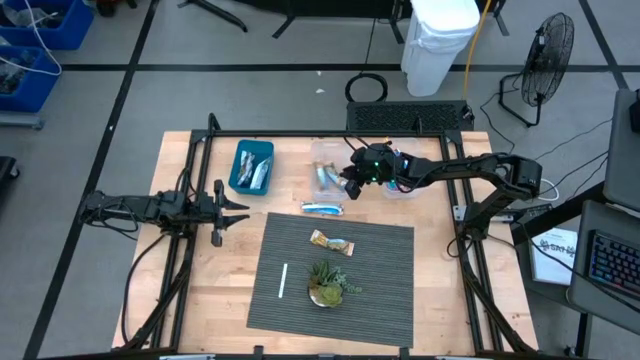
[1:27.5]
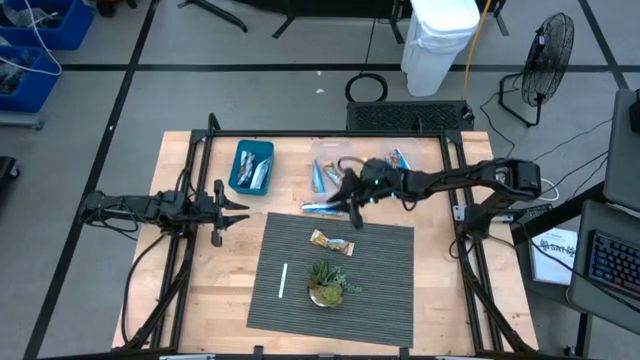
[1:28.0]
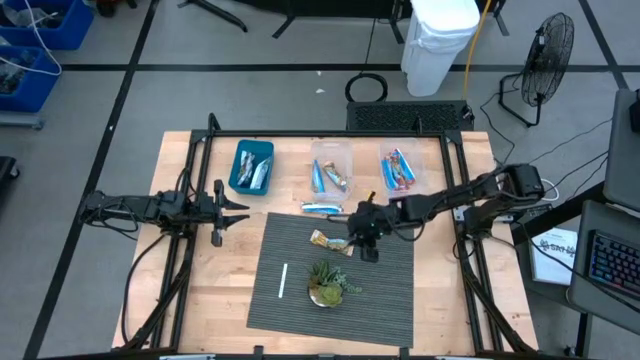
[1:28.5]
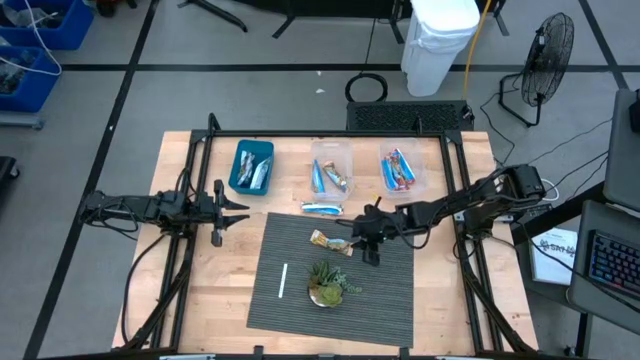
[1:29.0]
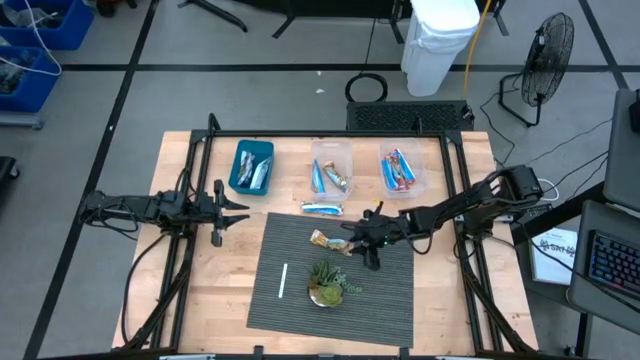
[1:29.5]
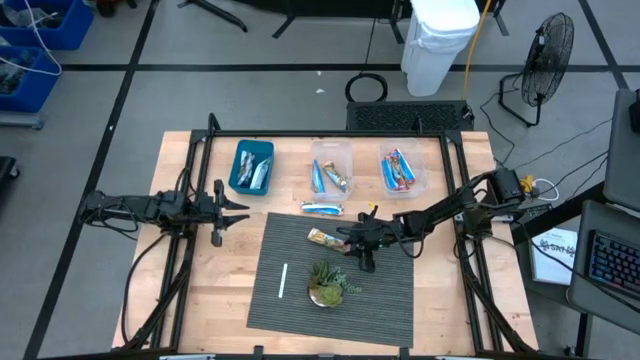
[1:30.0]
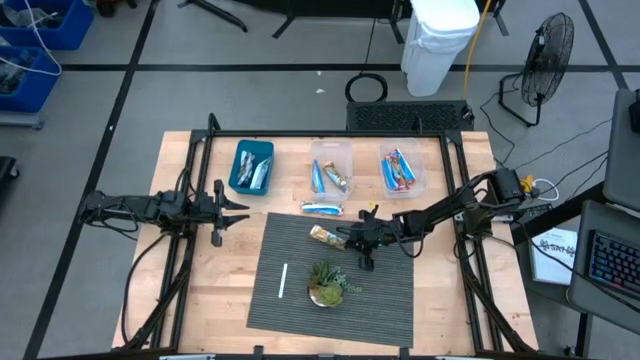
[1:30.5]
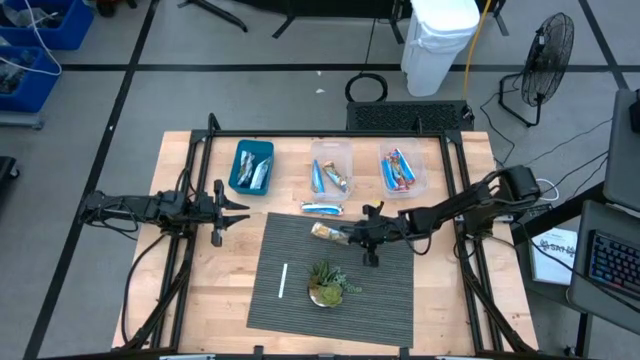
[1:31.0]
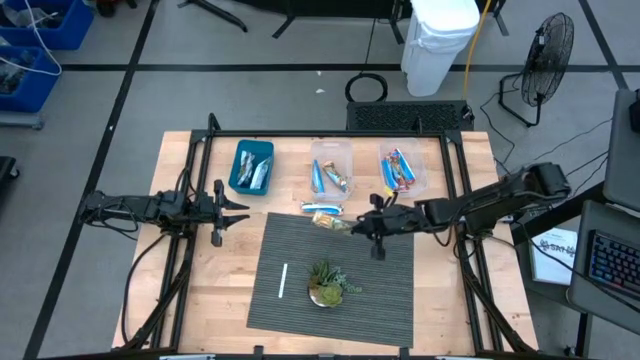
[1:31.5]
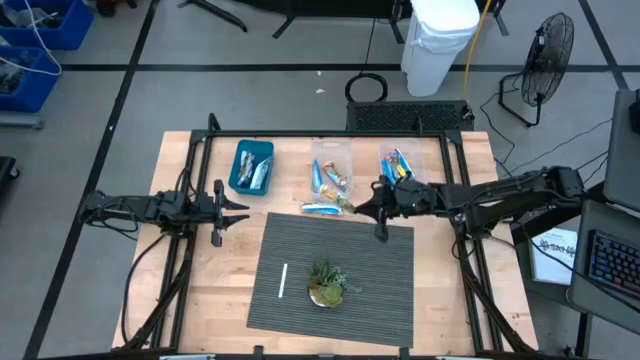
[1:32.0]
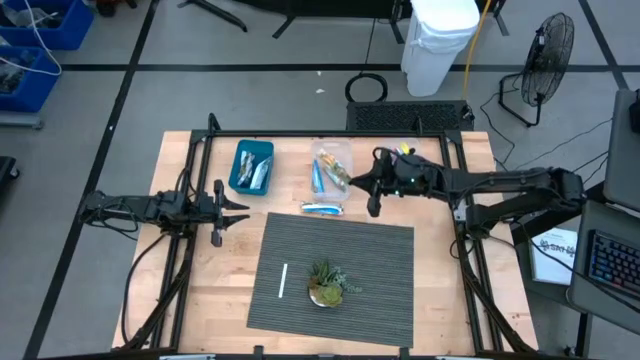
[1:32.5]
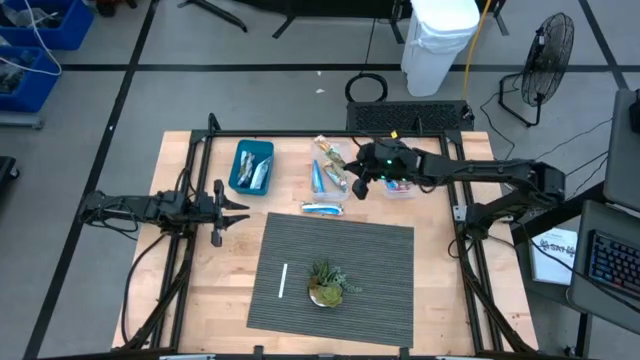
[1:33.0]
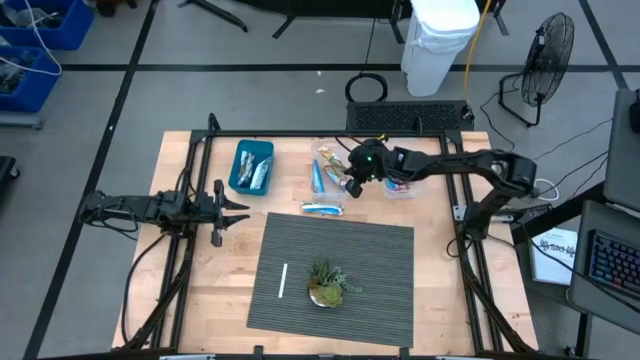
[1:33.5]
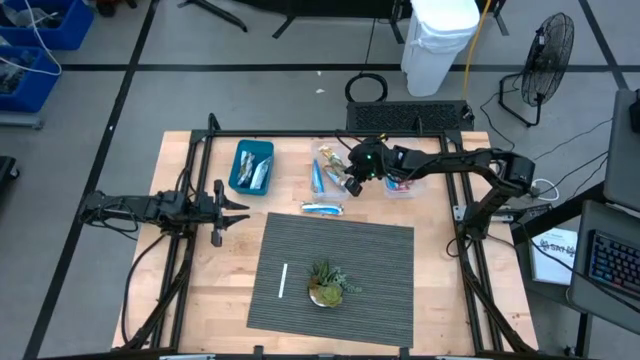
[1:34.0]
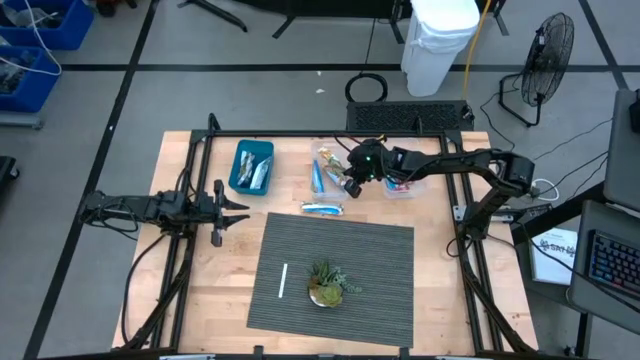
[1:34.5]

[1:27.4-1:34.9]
Task: Pick and place Granola Bars by type
Put the yellow granola bar into the left transparent bin

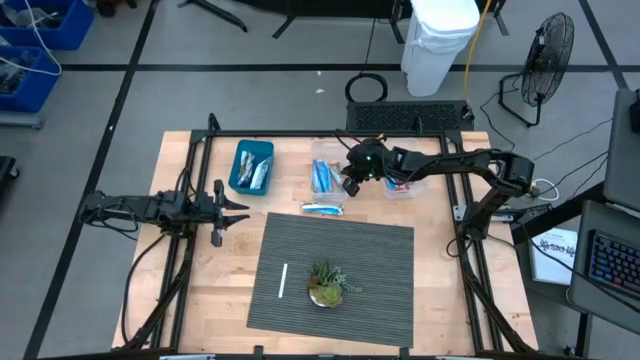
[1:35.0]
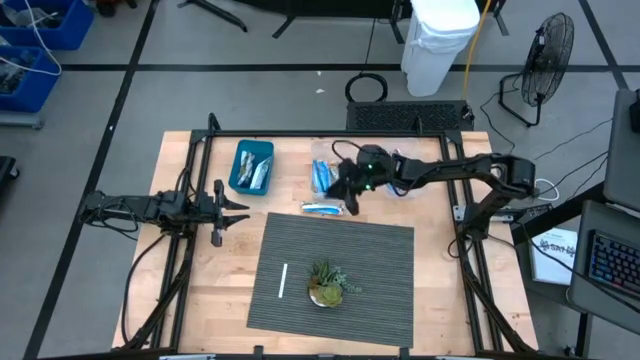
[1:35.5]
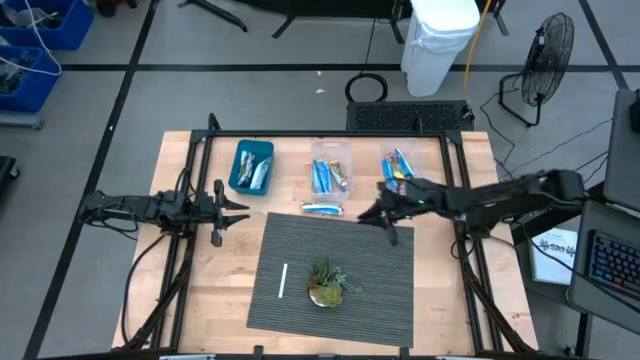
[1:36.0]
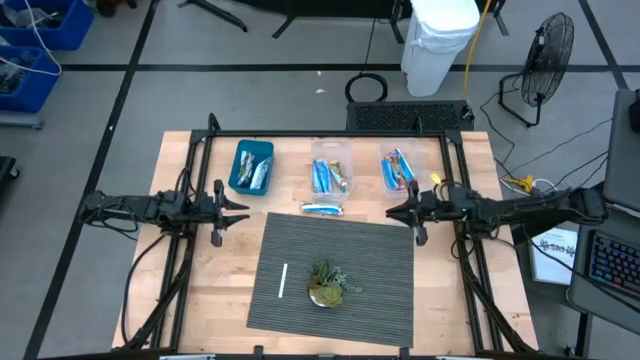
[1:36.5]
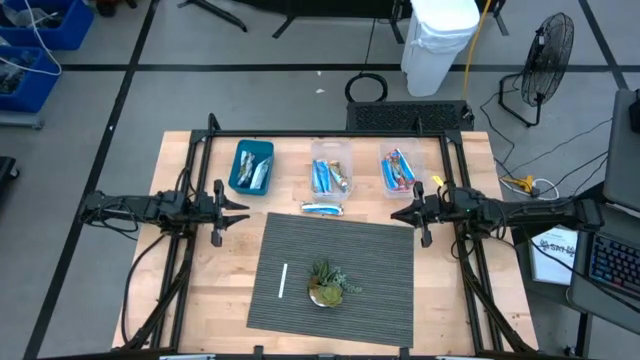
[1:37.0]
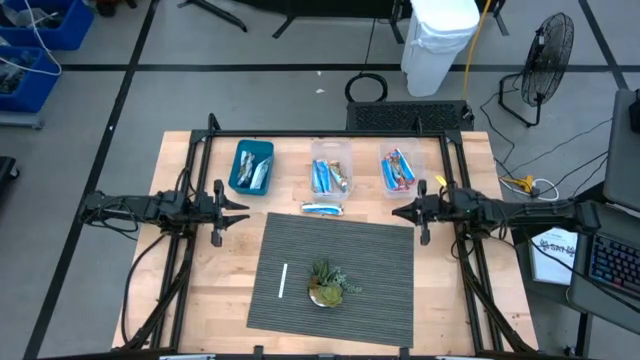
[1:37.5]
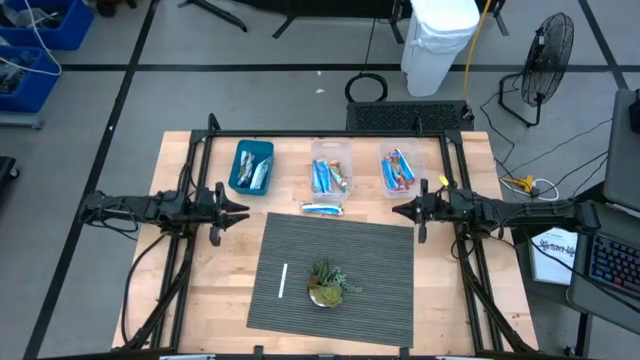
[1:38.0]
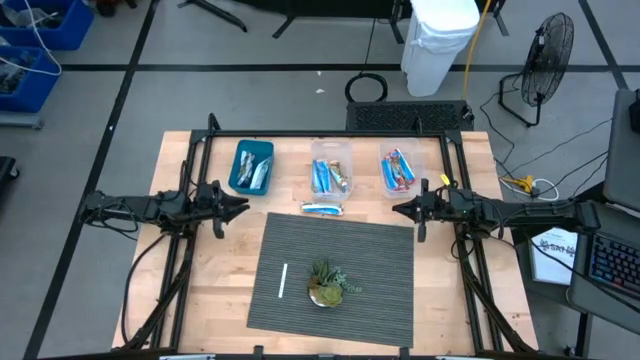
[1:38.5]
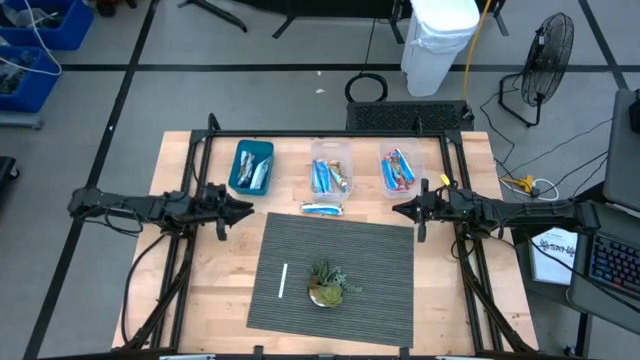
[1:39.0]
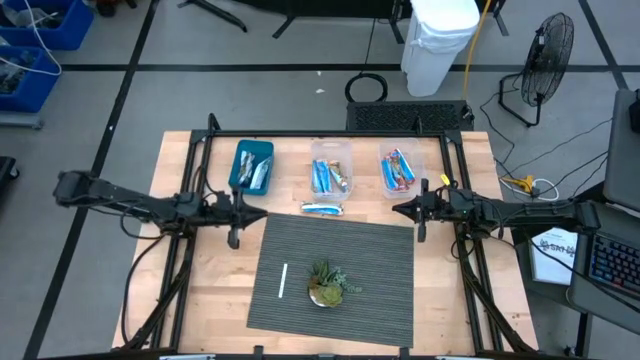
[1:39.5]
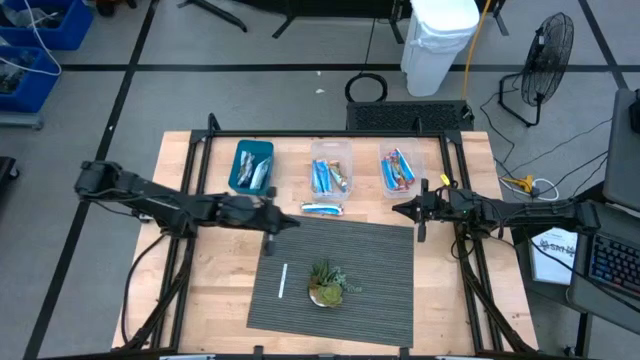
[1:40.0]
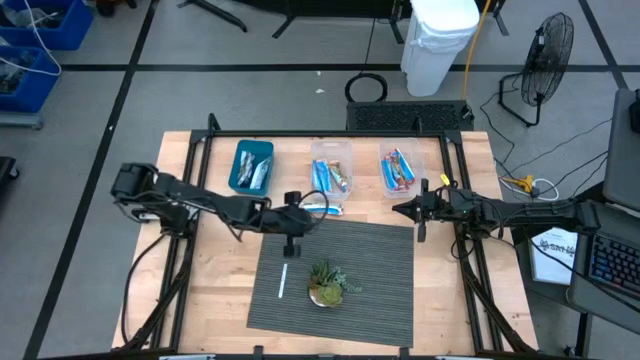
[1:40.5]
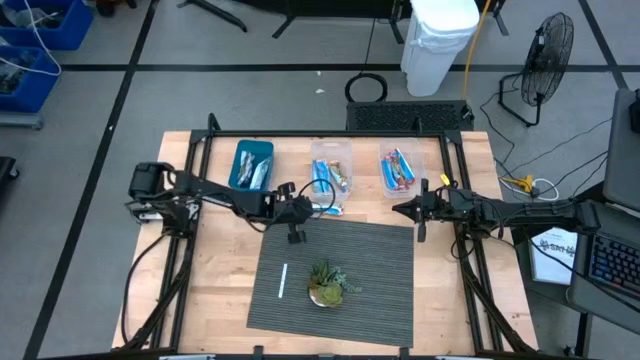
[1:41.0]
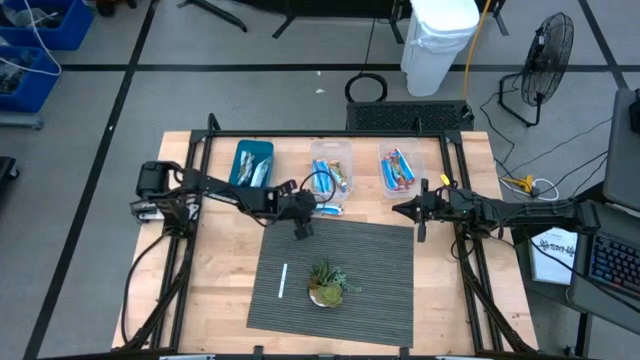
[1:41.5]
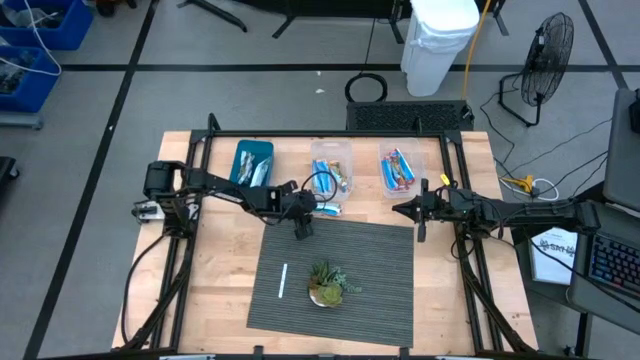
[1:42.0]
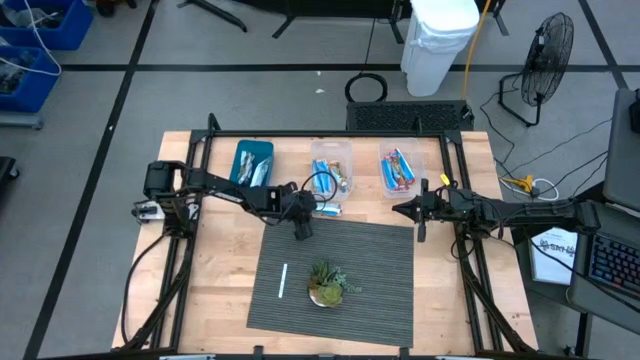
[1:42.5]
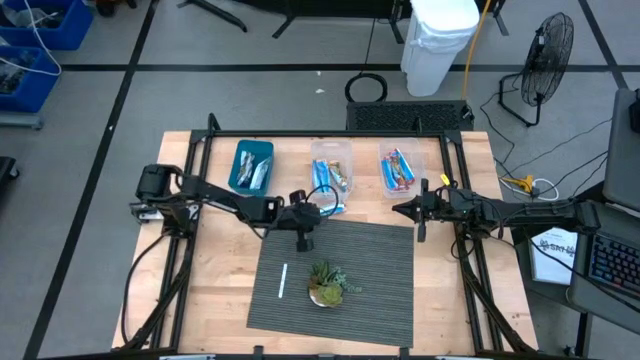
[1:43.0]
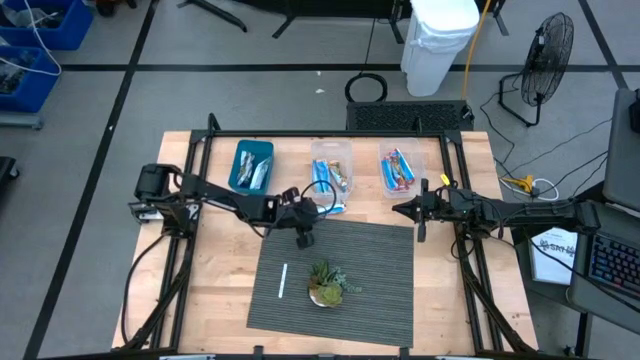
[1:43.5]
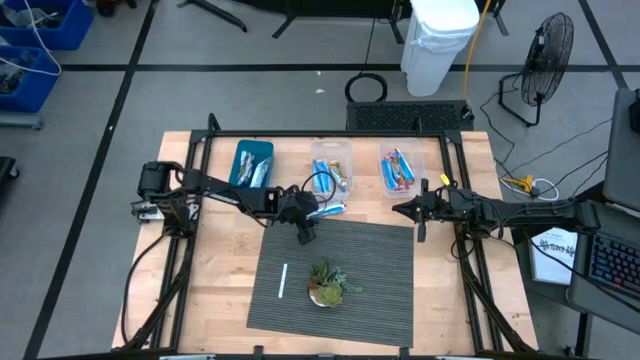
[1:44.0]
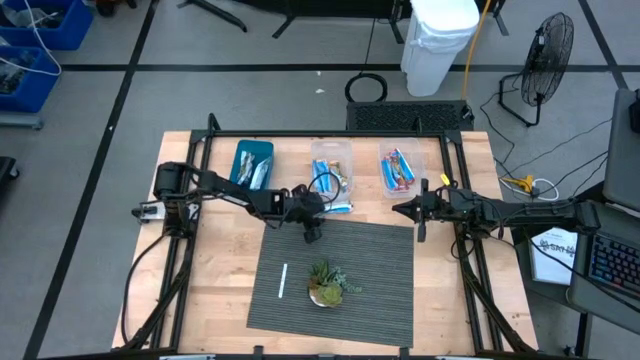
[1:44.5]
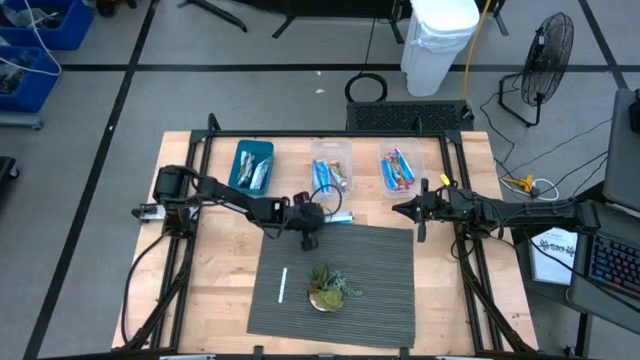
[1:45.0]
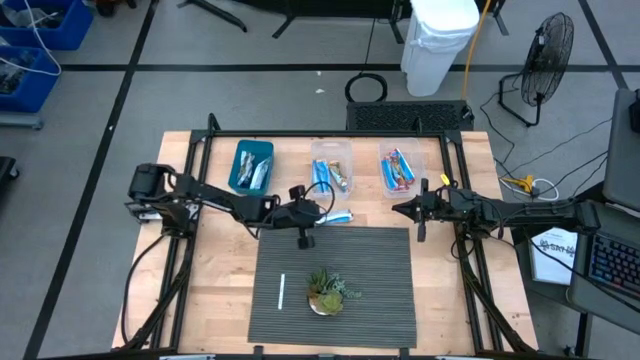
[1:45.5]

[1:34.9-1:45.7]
Put the yellow granola bar into the left transparent bin

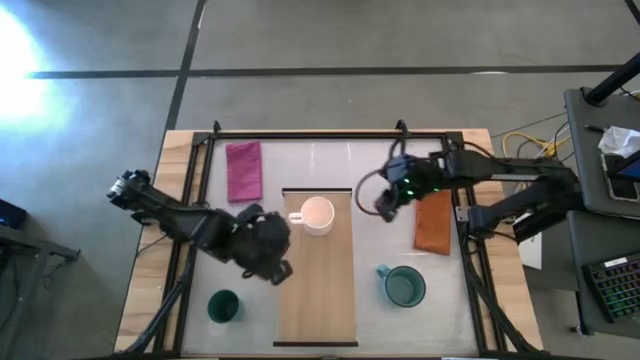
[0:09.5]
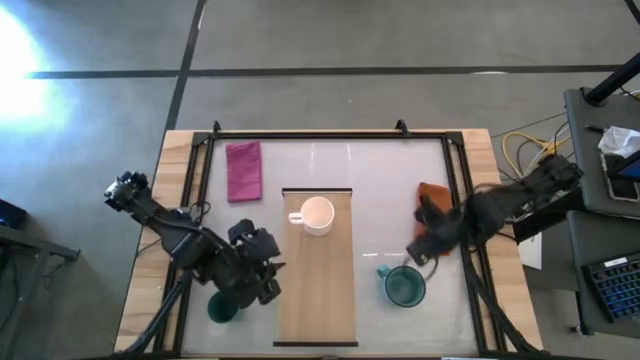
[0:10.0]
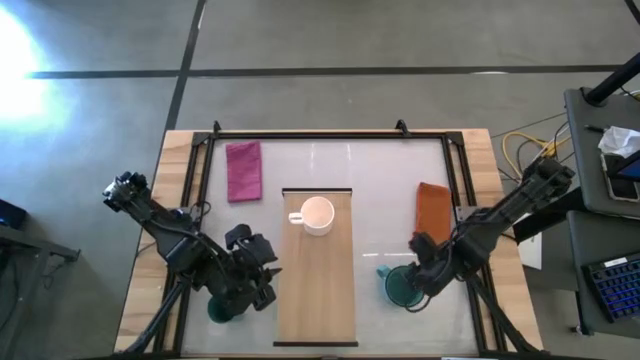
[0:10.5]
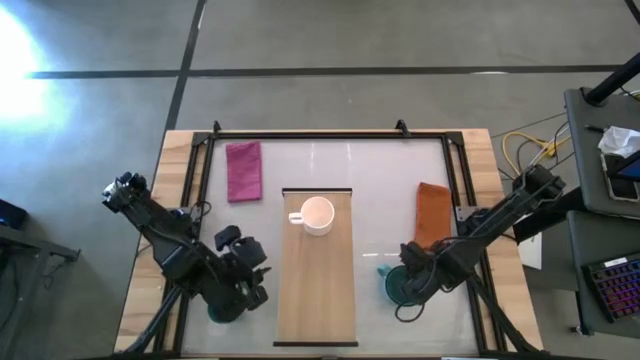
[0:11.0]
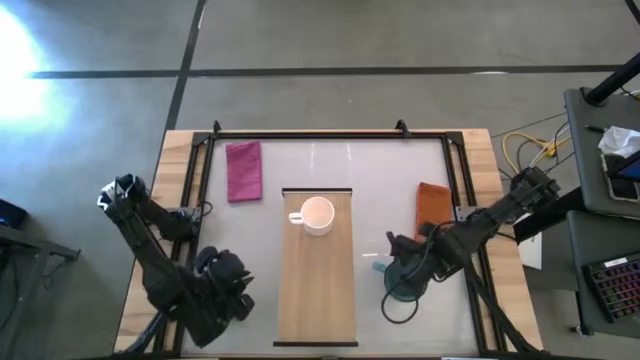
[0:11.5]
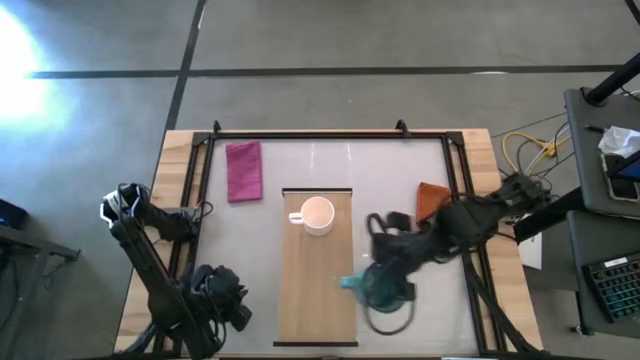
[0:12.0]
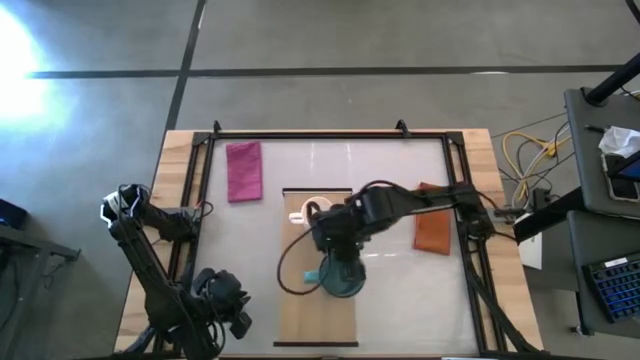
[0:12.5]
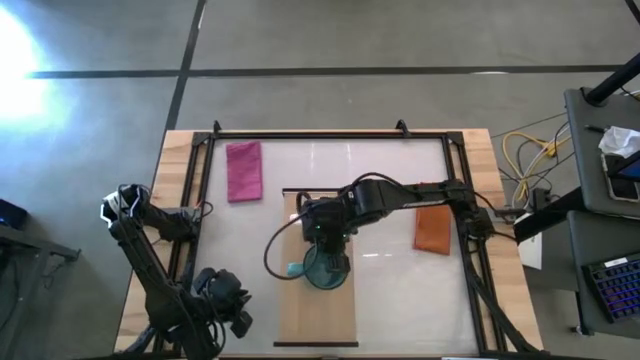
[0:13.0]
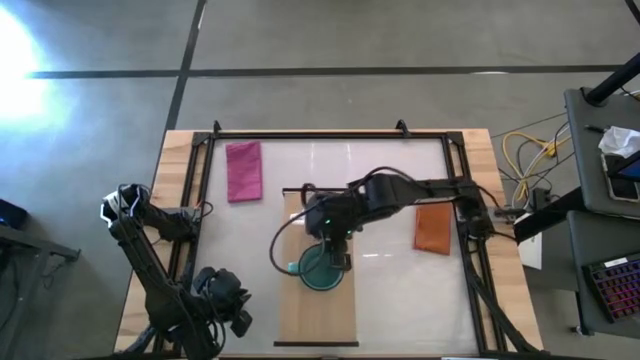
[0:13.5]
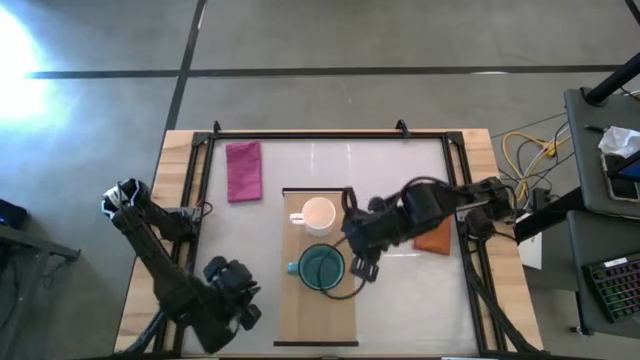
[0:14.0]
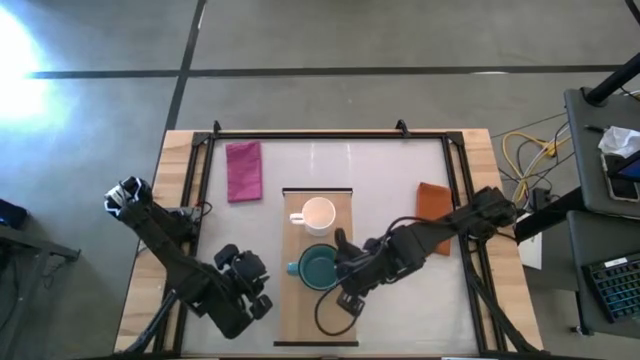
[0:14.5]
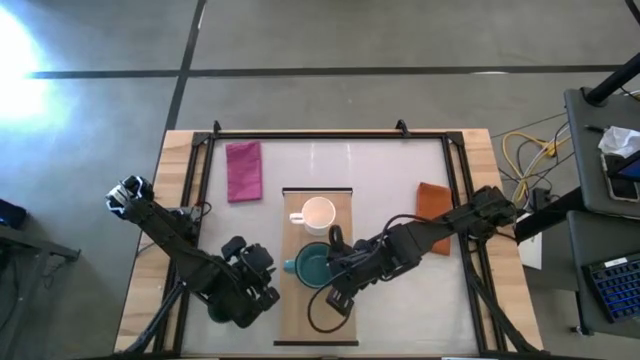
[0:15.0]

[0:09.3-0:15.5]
Task: Stack small to large cups/mugs on shelf
Put the right blue cup on the shelf
